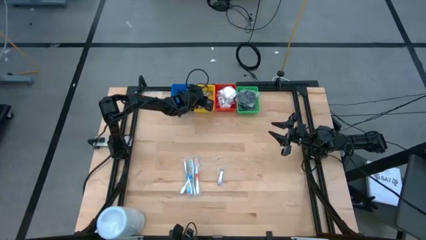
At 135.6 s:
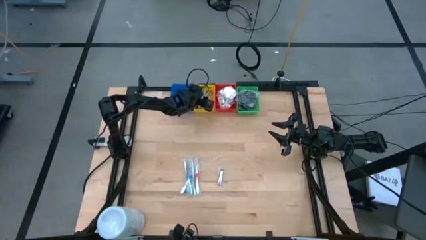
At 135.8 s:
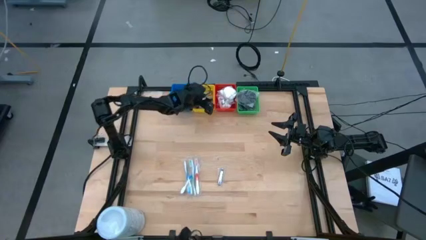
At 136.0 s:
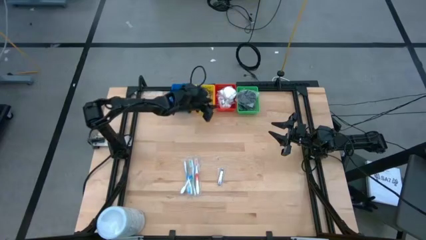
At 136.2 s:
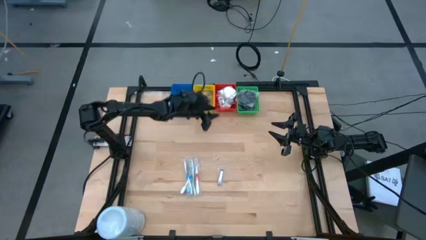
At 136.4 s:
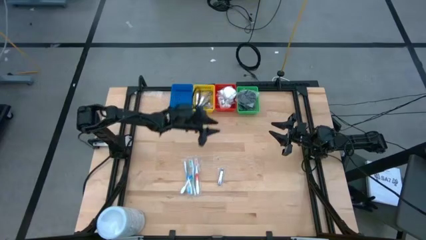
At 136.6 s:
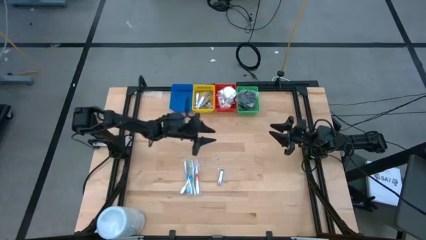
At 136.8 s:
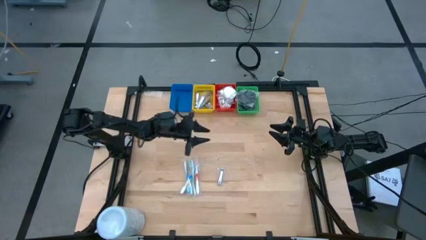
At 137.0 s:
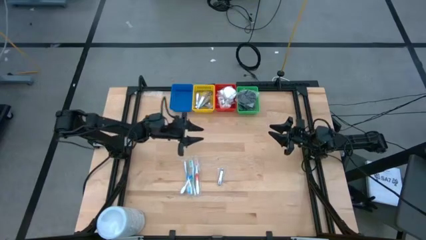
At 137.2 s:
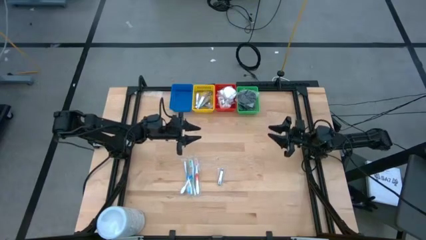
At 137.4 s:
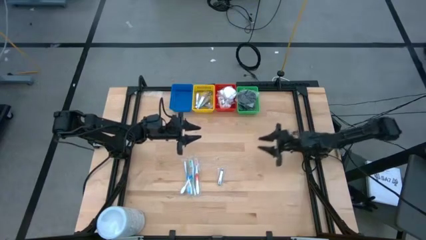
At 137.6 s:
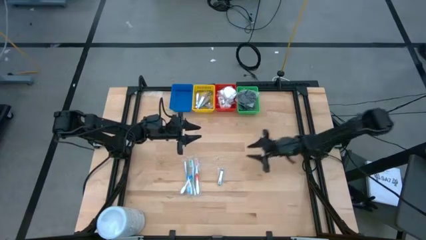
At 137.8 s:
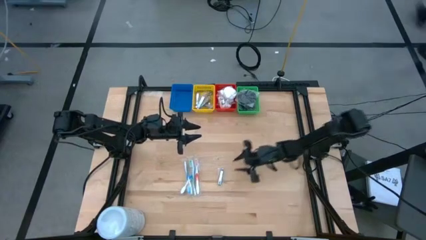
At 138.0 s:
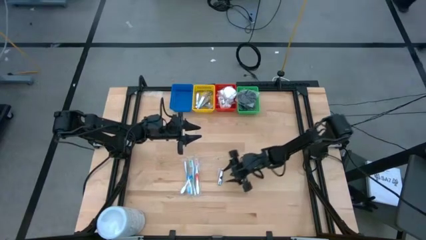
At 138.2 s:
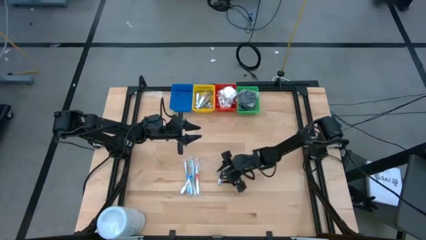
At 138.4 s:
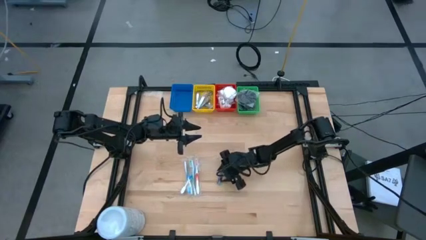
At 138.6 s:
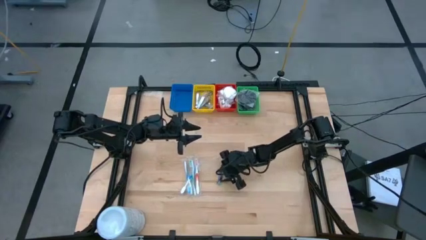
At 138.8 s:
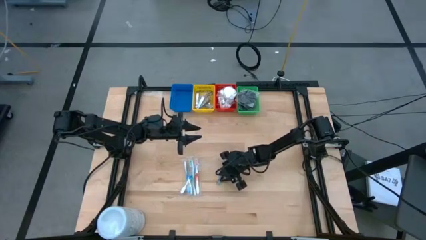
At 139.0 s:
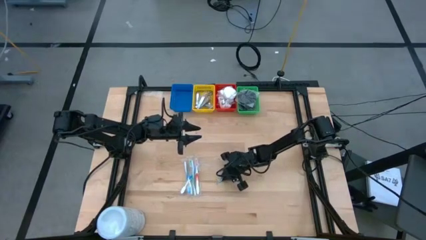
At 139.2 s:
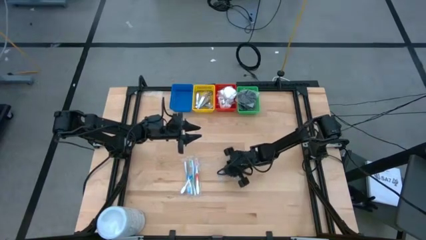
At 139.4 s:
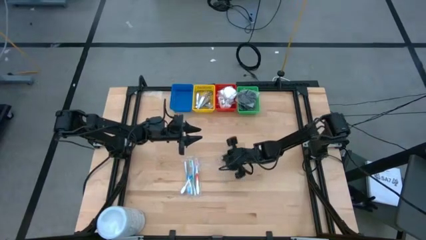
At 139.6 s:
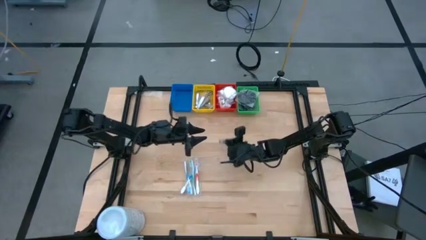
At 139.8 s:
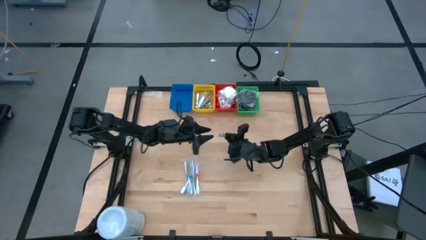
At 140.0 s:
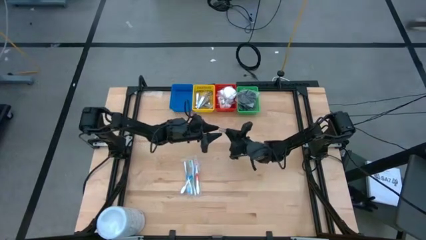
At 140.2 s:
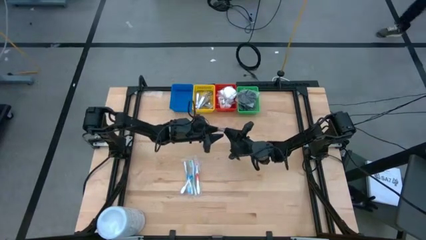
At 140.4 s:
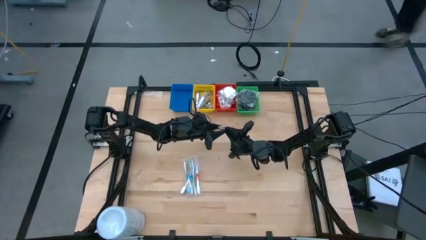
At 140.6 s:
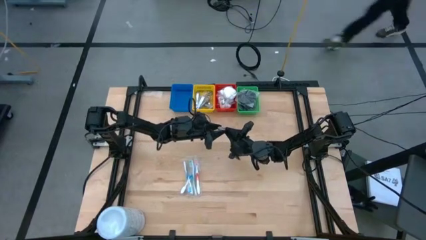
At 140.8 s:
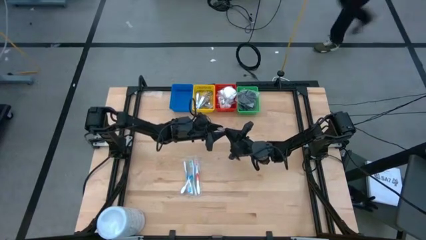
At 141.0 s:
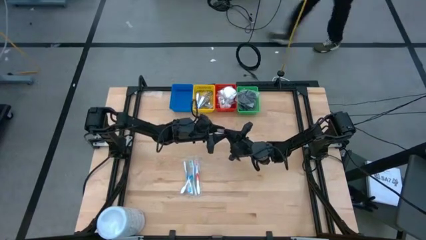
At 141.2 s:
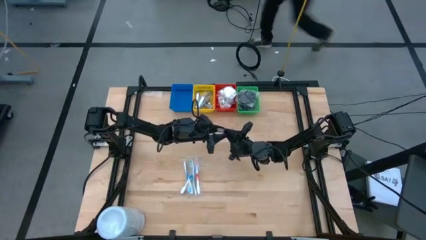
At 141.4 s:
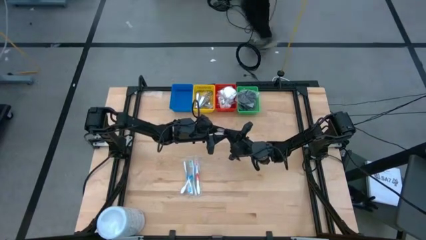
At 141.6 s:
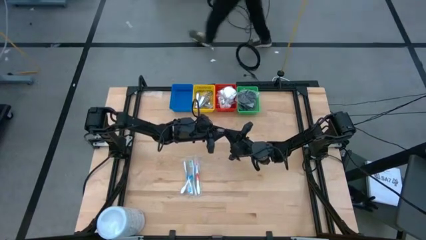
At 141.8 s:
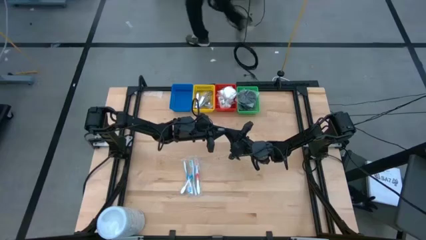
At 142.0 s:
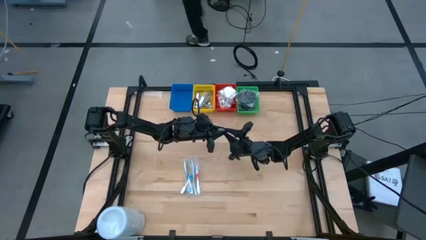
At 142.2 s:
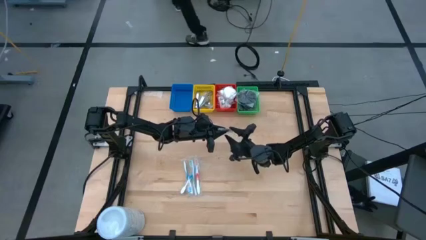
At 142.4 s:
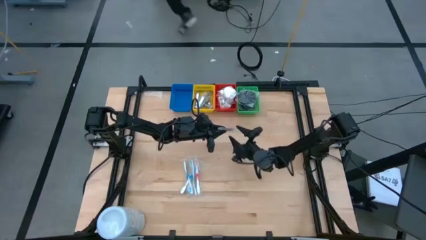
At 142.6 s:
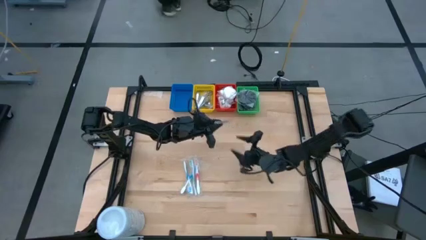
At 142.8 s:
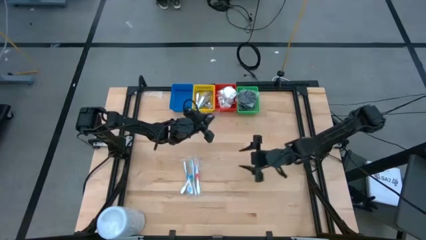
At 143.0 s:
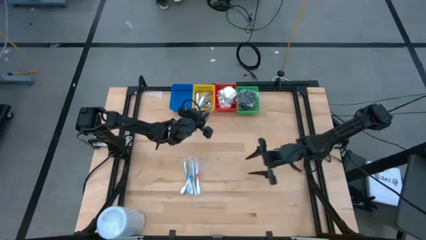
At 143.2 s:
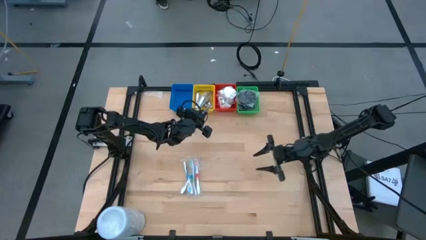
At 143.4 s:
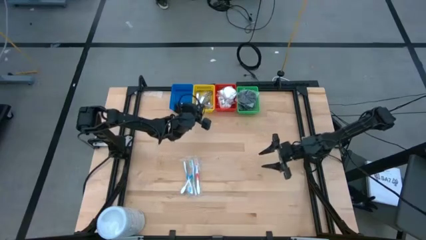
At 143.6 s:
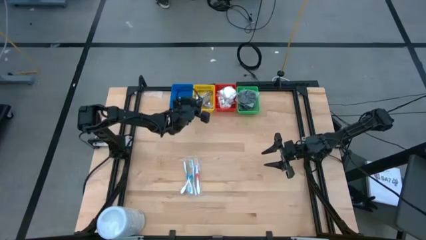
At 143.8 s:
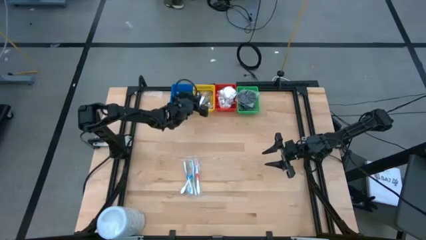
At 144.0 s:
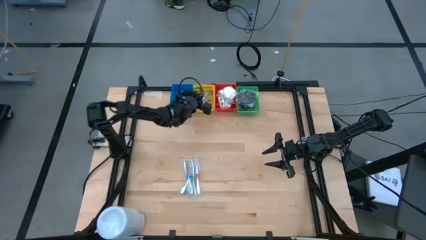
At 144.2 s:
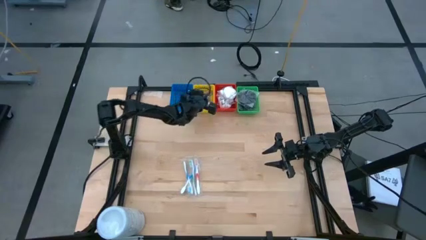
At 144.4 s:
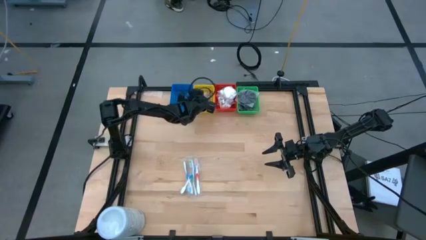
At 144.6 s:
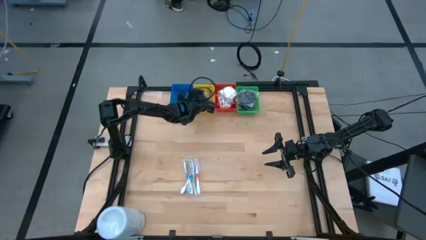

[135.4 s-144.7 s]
Task: Pick & Place Travel size toiletries
Put the nail cutter into the yellow bin

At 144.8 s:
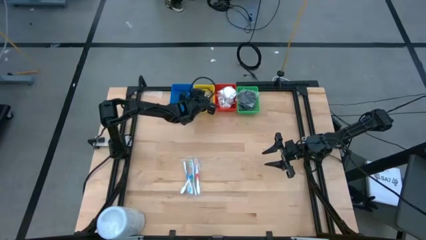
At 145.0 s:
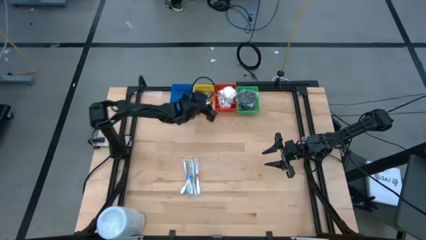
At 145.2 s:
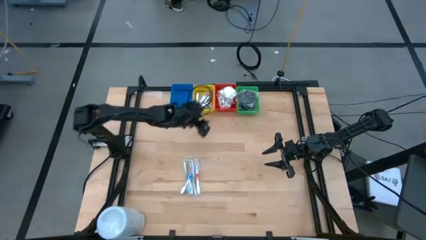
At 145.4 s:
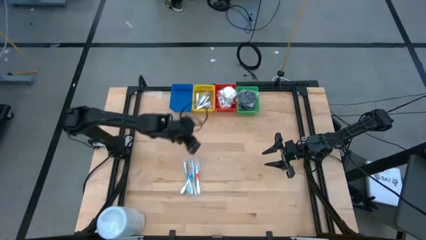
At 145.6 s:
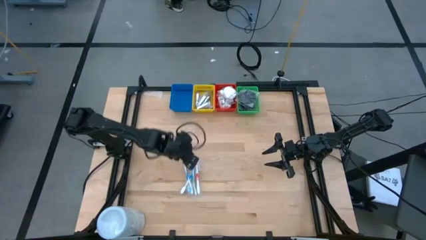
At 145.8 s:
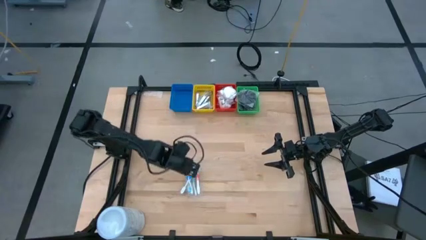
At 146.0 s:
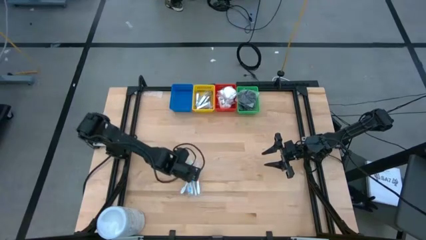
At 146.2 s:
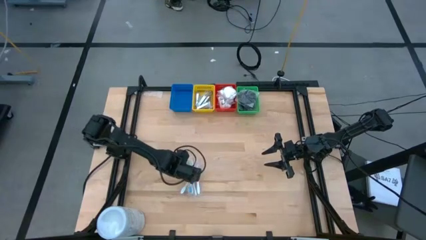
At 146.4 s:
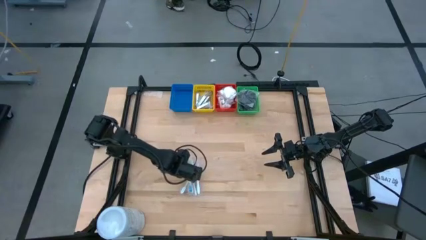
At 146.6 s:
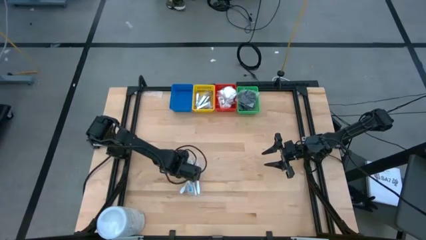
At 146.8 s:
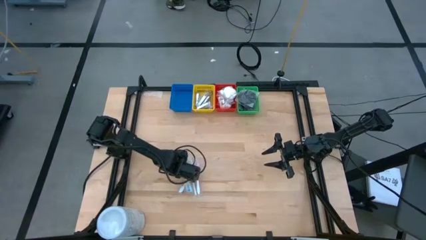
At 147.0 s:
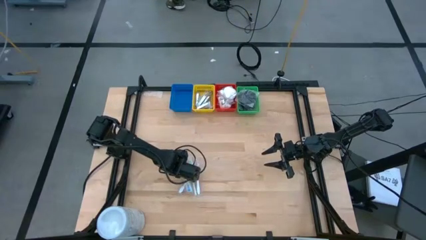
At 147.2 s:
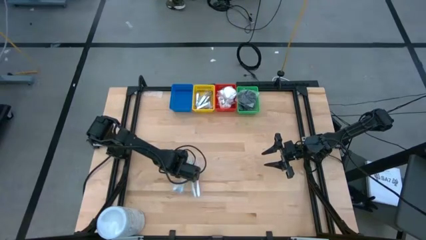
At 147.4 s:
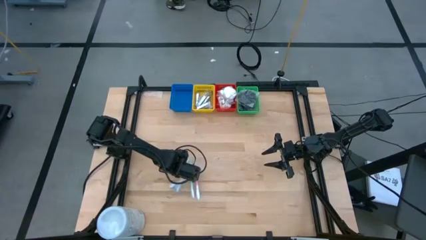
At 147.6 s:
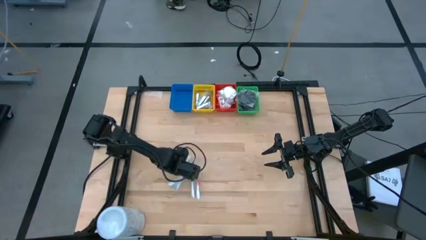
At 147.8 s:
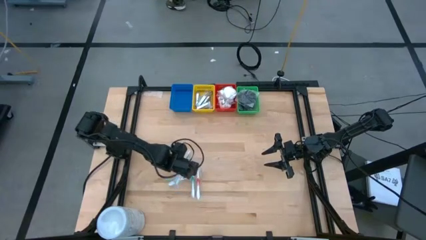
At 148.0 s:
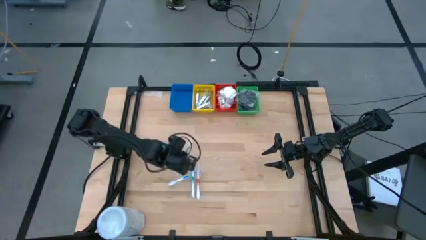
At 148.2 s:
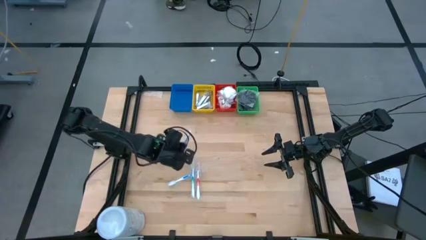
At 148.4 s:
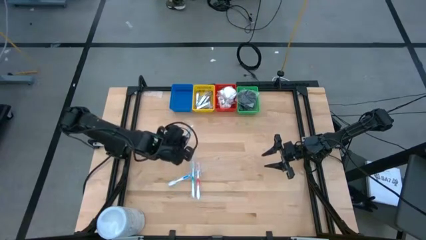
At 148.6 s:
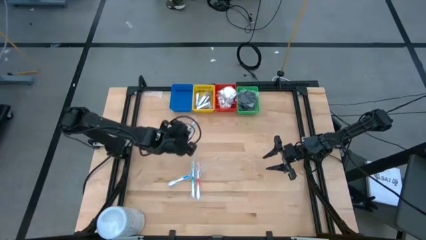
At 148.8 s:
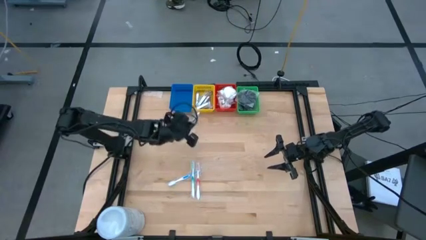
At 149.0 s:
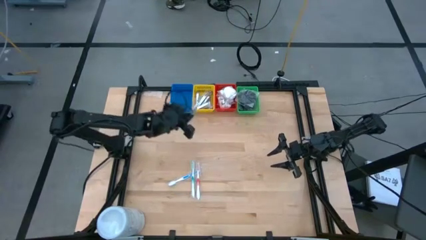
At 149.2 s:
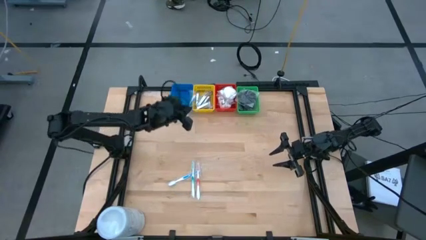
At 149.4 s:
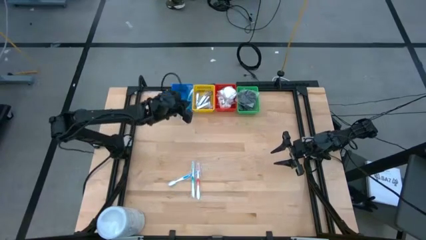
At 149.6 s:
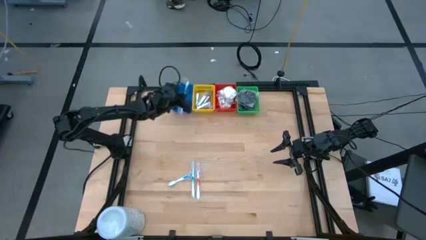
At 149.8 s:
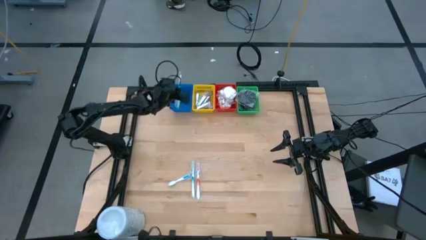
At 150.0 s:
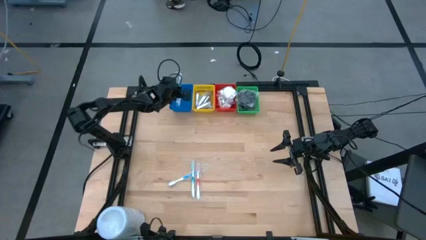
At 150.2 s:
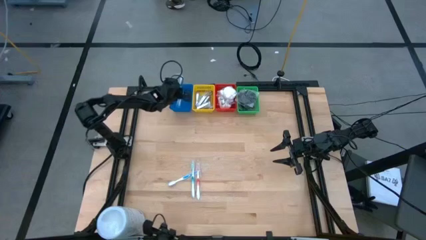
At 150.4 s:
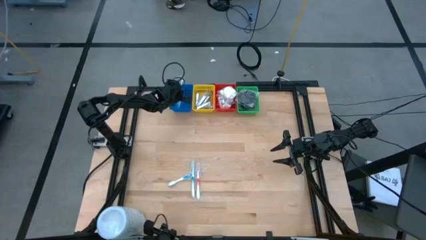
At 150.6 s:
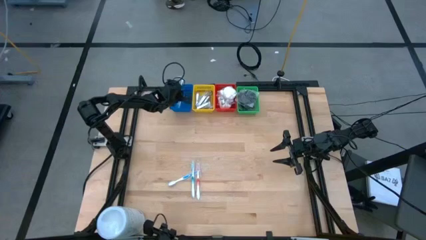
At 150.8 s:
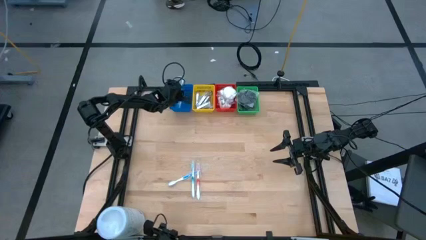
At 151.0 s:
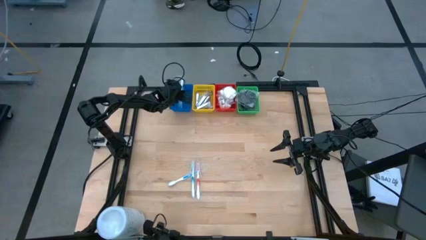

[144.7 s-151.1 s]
Put the blue toothbrush into the blue bin
